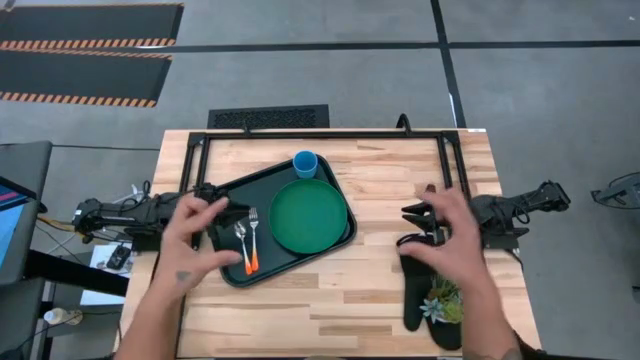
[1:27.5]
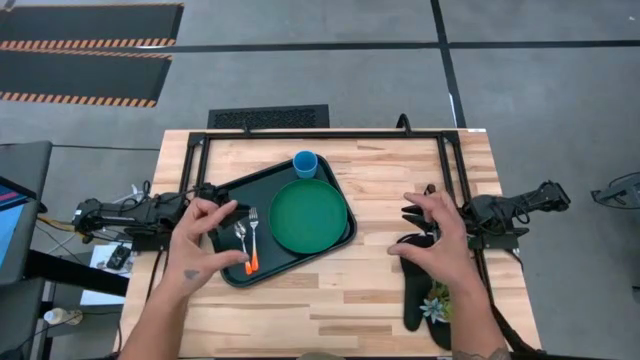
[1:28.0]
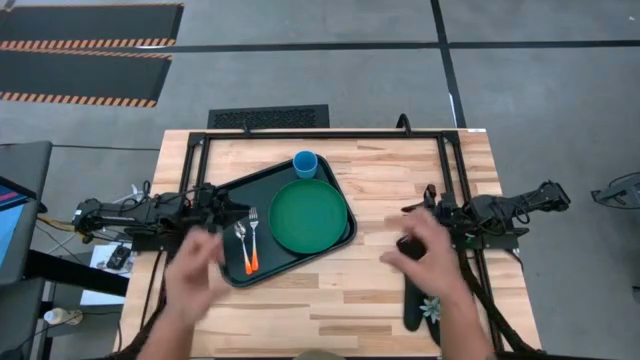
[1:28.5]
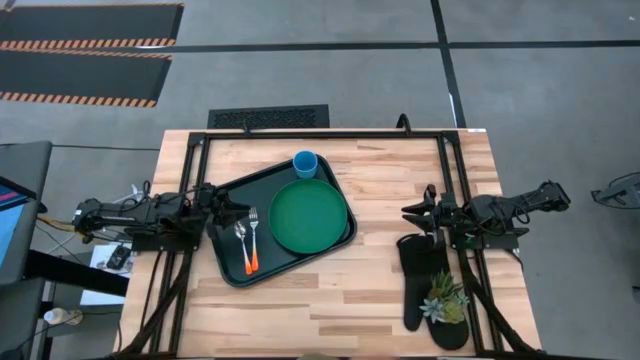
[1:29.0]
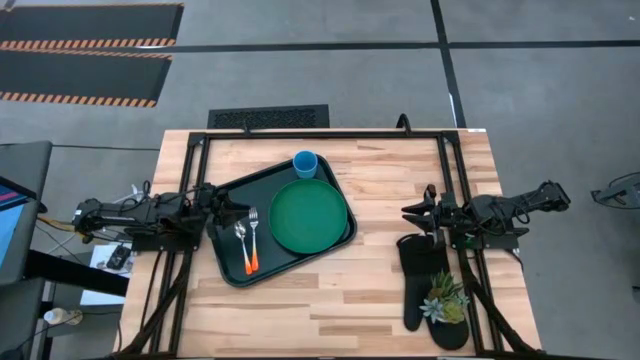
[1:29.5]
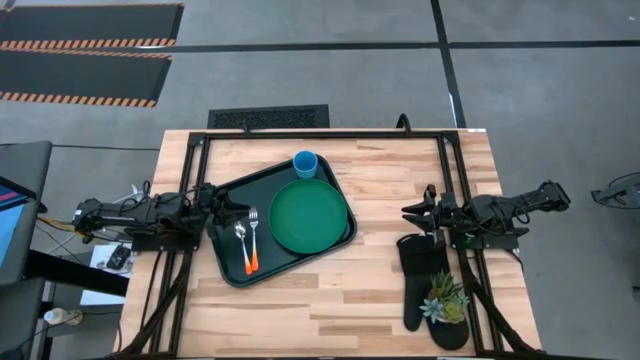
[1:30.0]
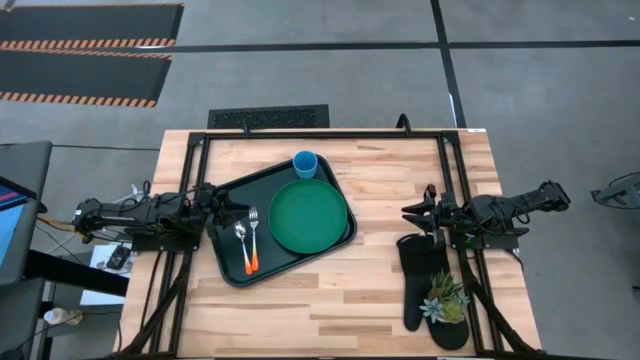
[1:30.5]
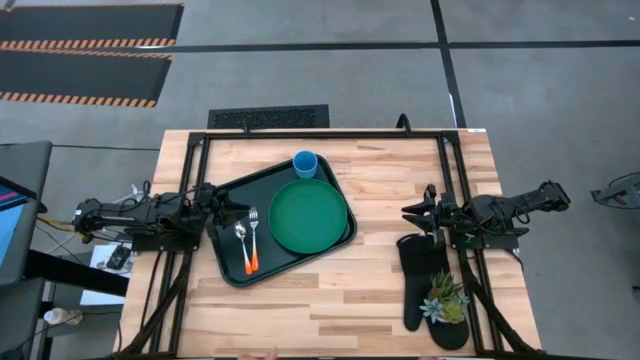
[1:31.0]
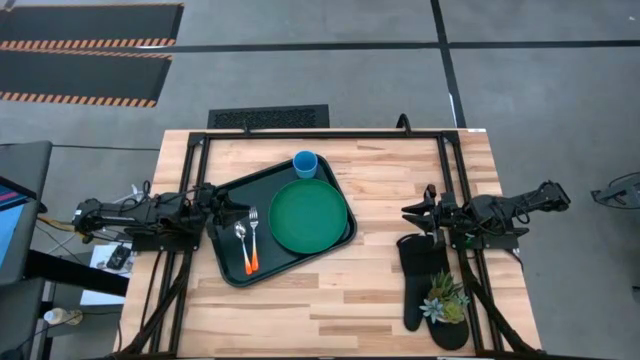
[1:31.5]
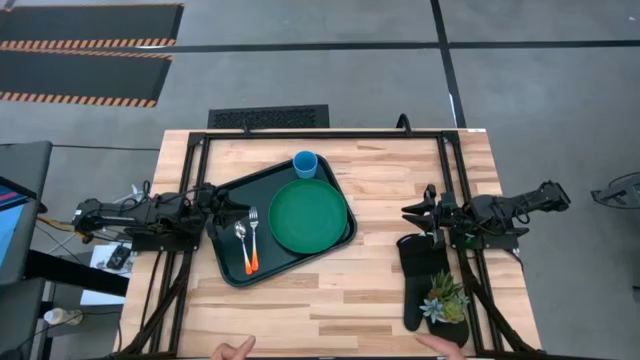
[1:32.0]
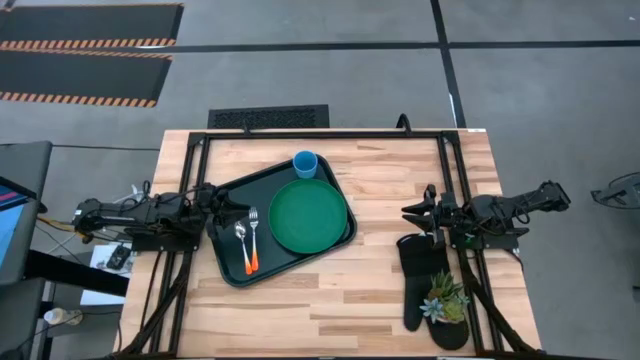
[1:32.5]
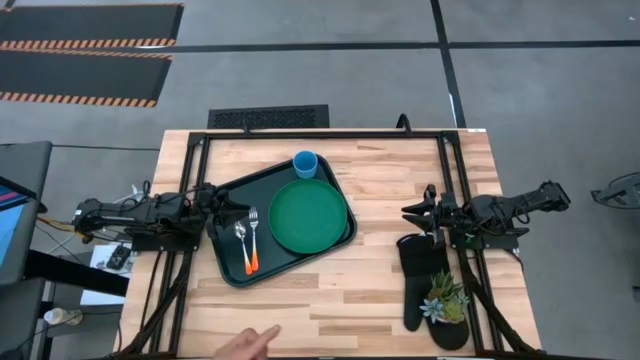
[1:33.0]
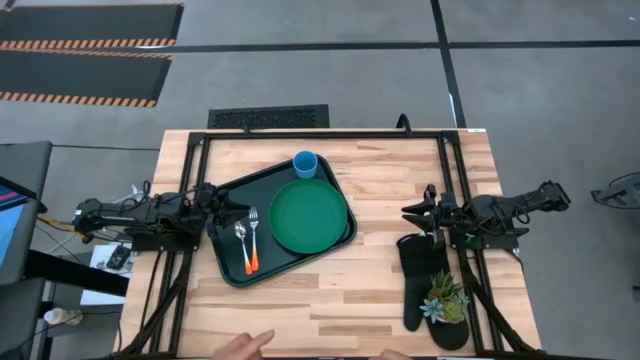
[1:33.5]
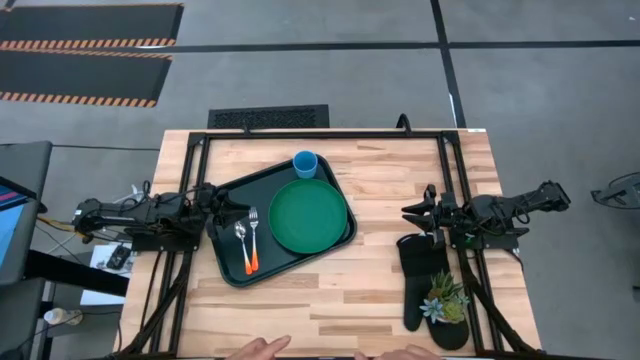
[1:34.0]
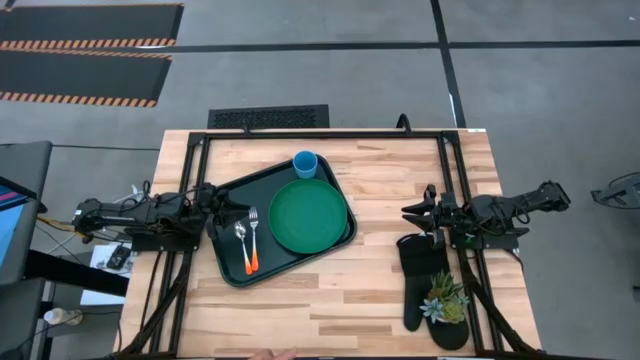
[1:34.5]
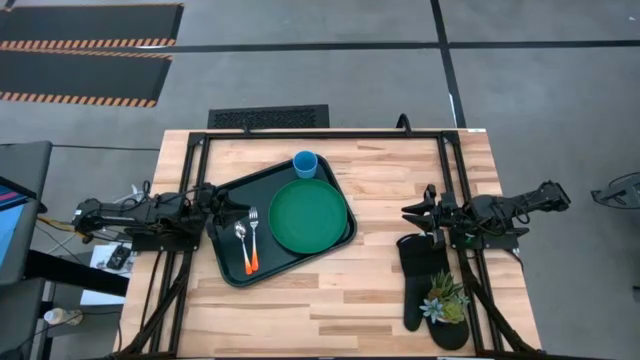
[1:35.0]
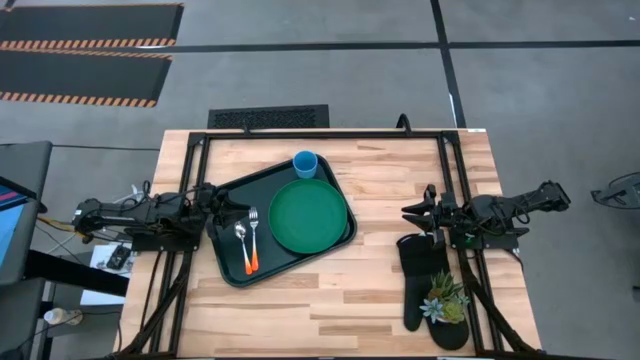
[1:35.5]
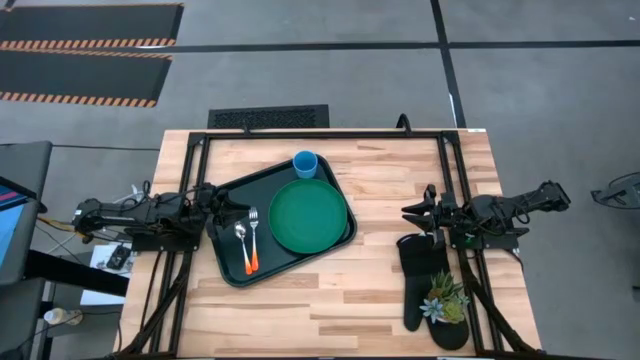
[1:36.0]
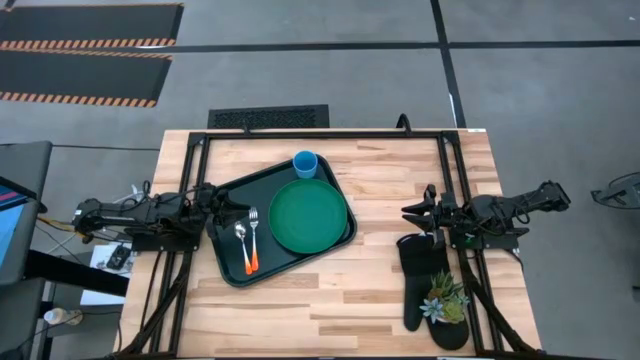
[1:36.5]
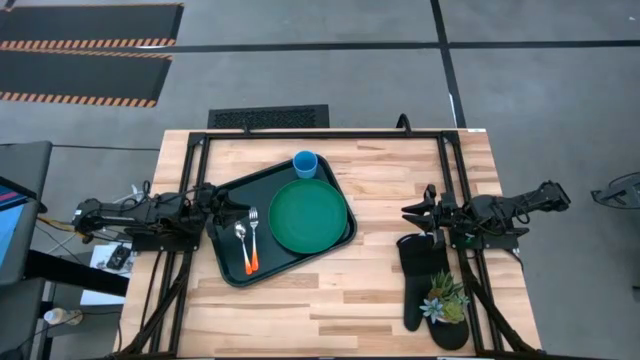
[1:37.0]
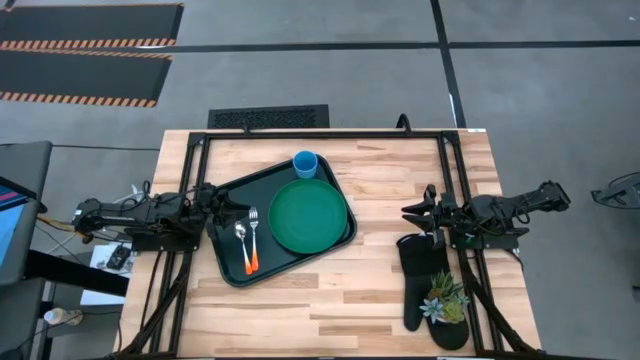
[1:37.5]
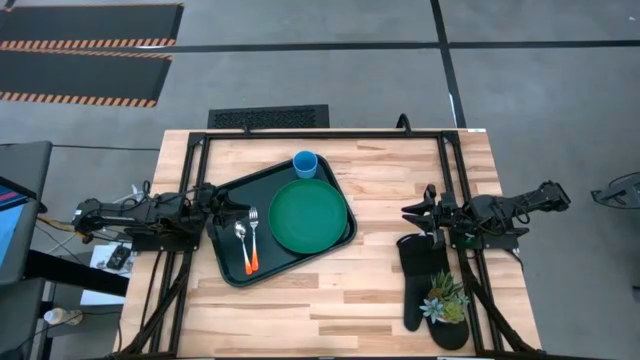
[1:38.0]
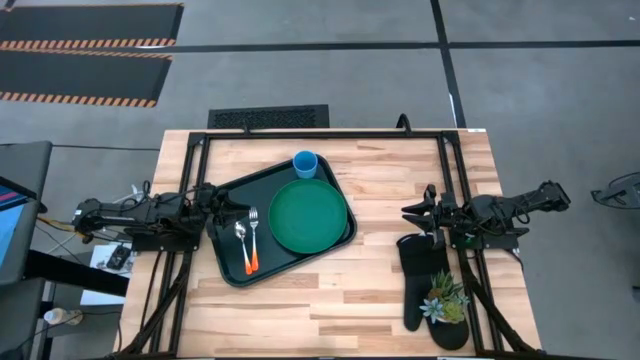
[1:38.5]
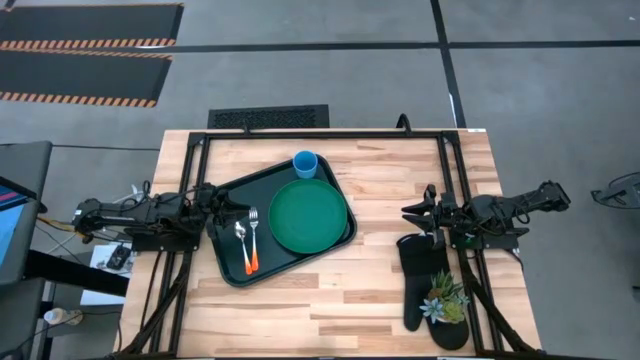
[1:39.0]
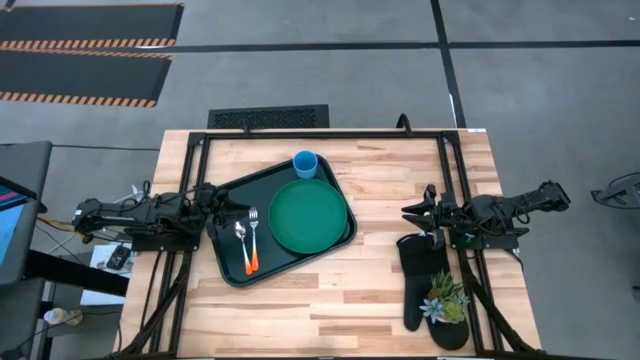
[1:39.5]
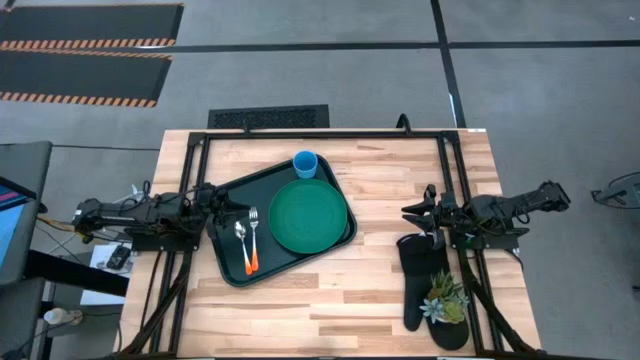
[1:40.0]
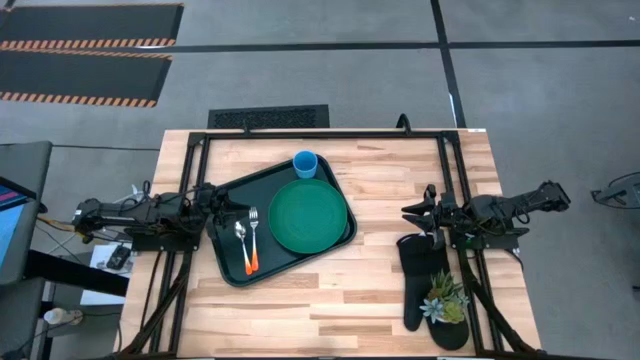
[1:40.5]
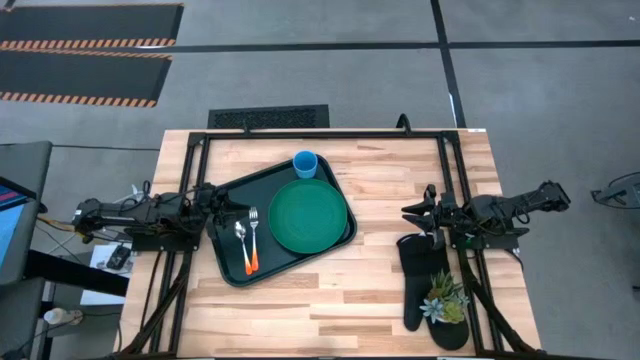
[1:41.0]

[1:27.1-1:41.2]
Task: Pick and place plate/cup/fork/spoon on tray
Return to Home Position

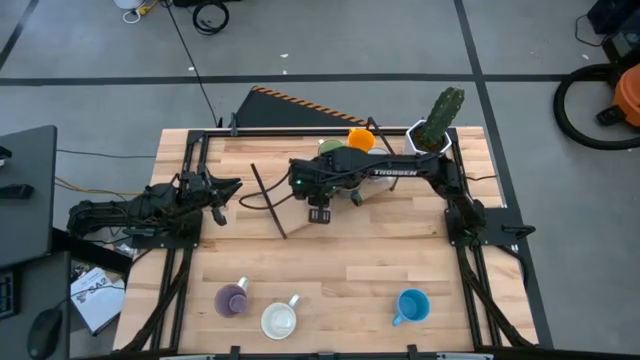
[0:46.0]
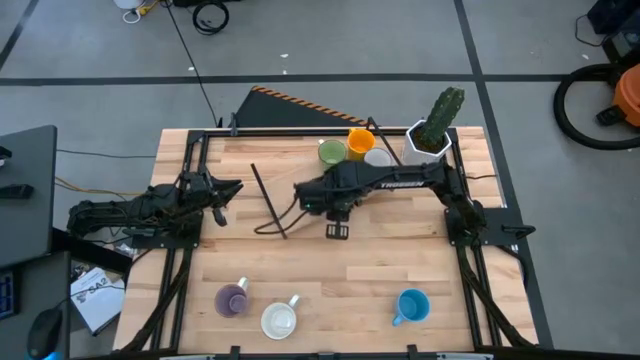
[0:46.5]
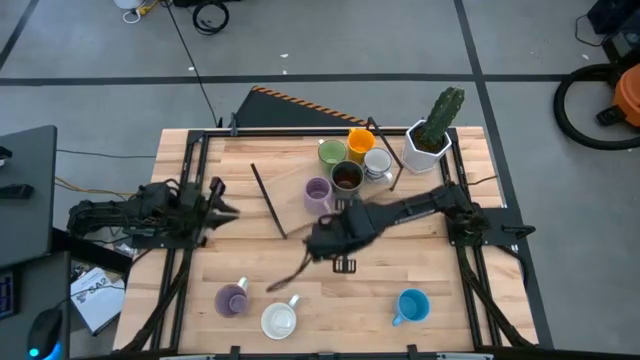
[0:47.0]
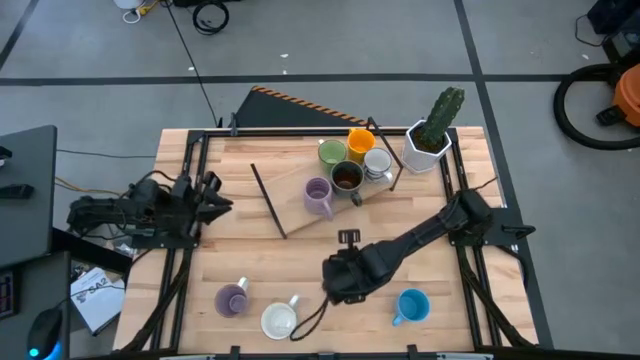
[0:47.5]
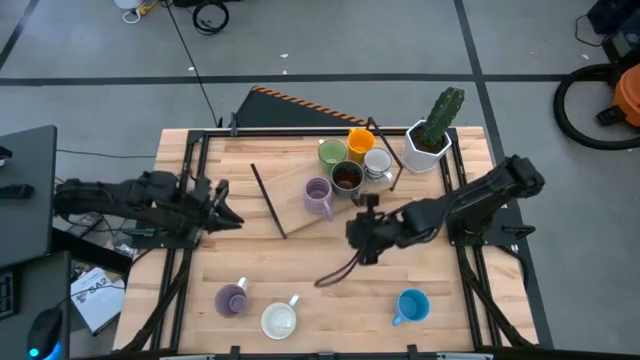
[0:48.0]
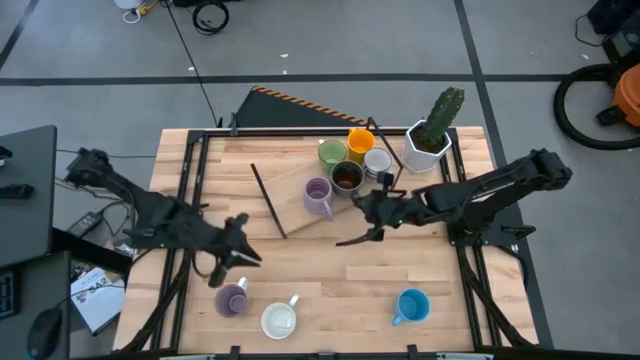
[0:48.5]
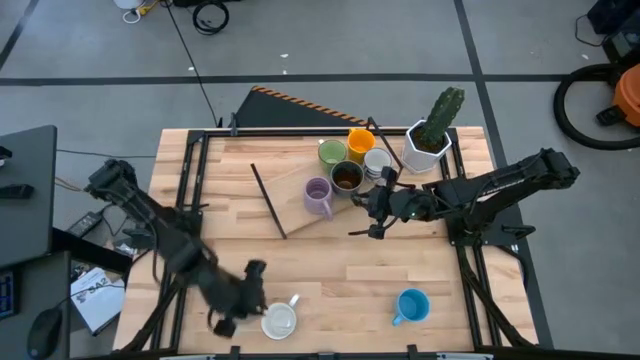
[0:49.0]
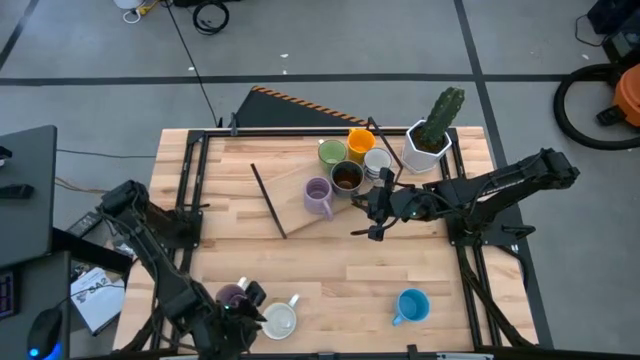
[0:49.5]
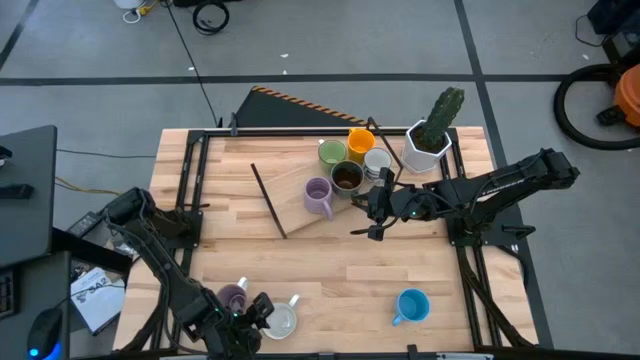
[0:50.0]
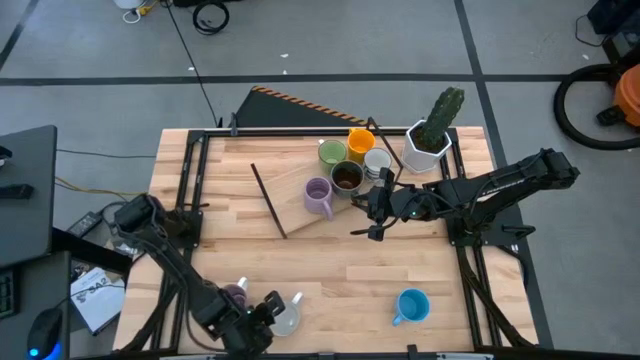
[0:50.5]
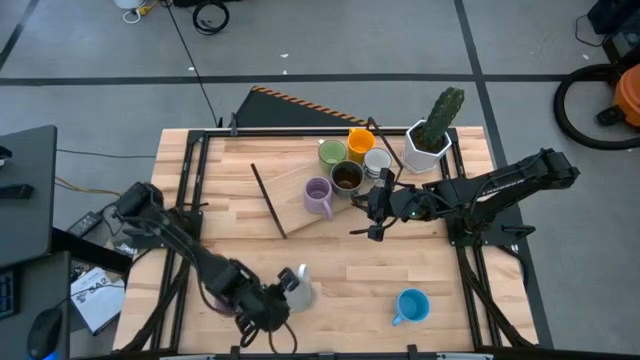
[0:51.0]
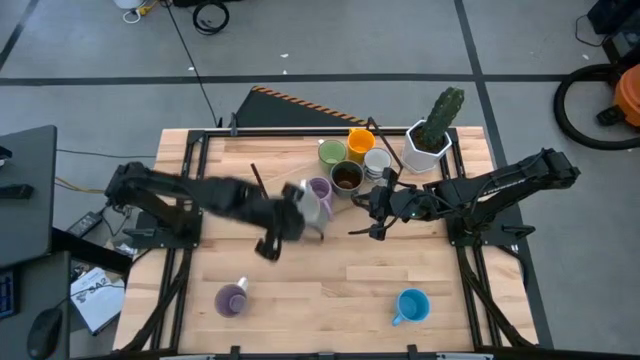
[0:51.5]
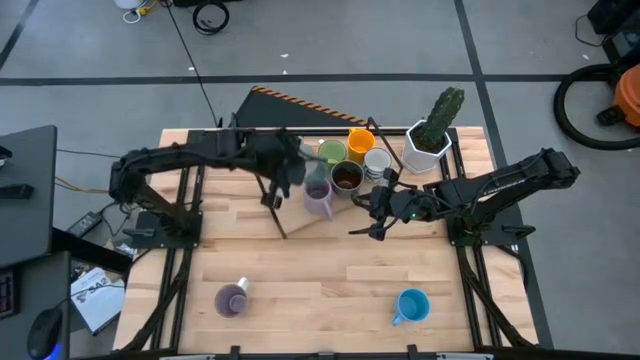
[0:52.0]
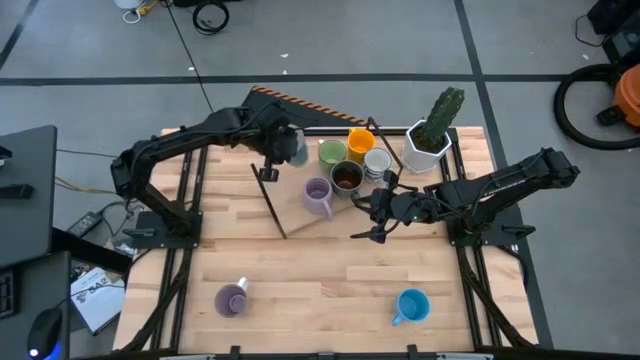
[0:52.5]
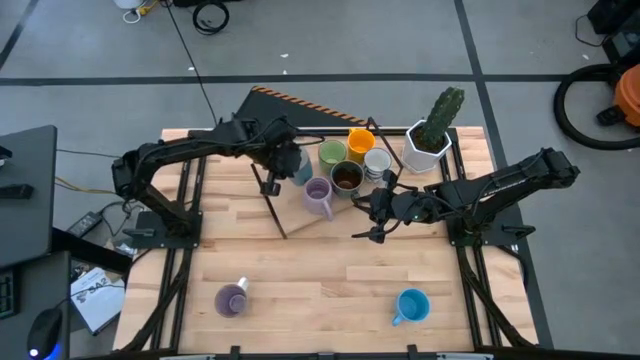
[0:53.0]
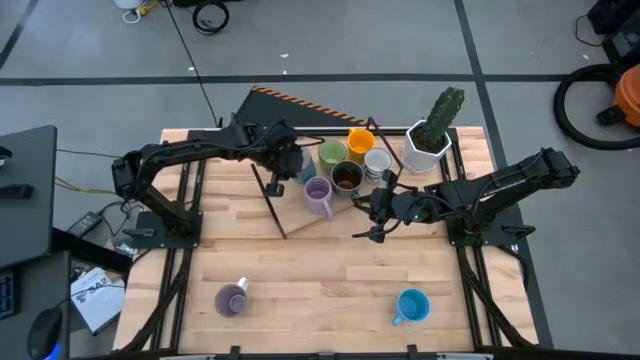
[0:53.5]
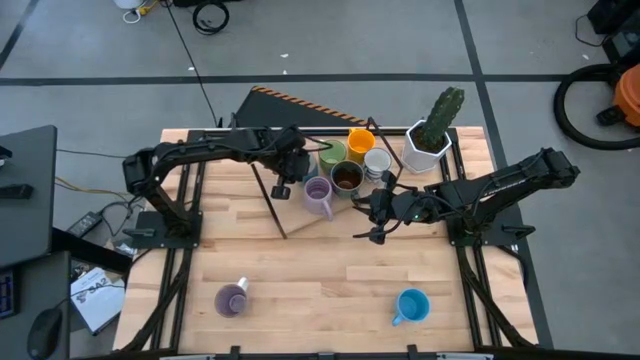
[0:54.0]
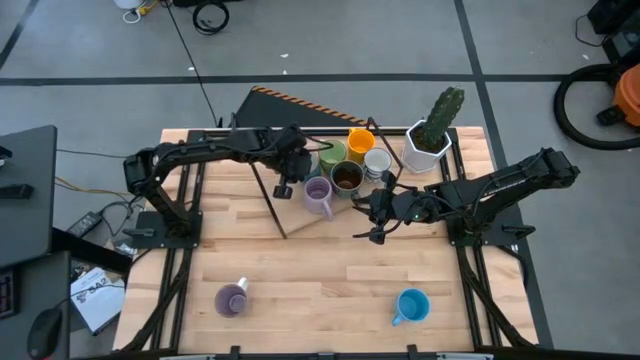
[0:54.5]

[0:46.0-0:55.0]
Task: Place coffee mugs
Put the light blue mug on the shelf
